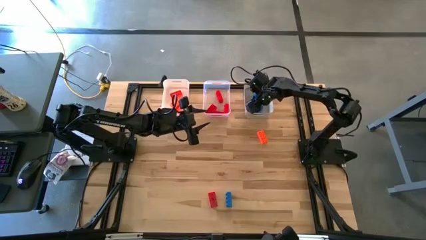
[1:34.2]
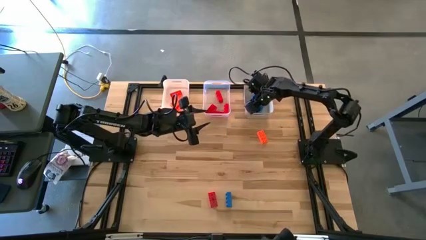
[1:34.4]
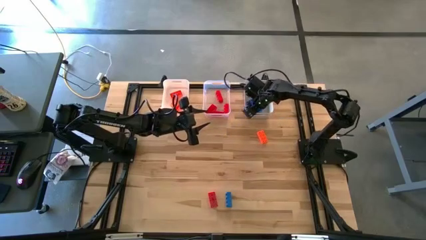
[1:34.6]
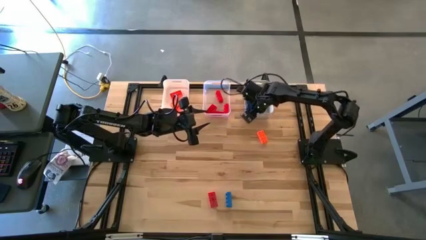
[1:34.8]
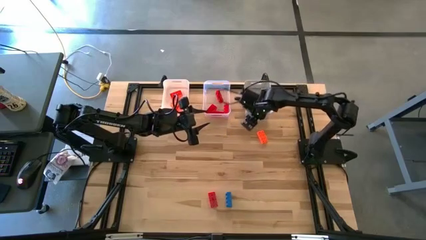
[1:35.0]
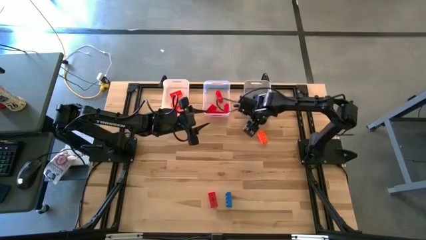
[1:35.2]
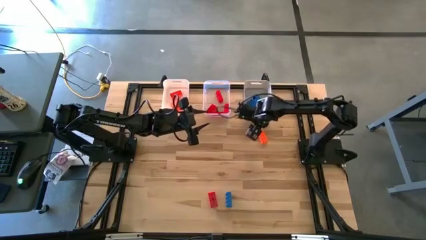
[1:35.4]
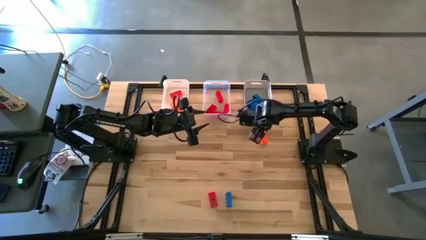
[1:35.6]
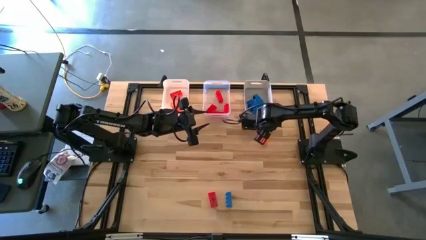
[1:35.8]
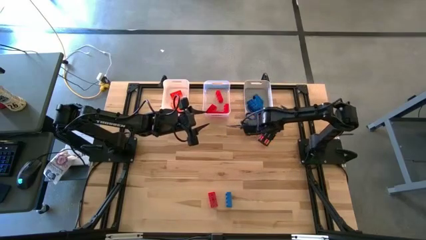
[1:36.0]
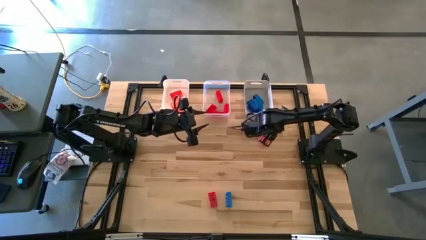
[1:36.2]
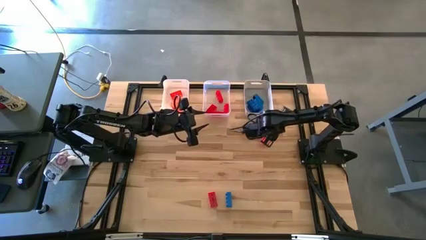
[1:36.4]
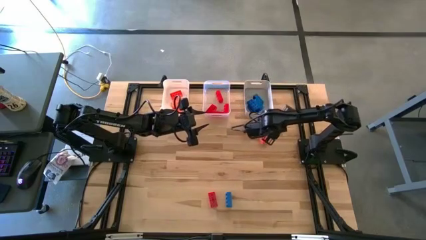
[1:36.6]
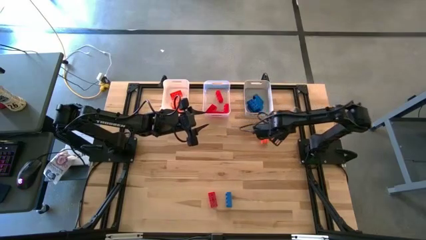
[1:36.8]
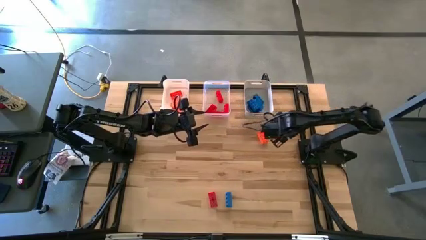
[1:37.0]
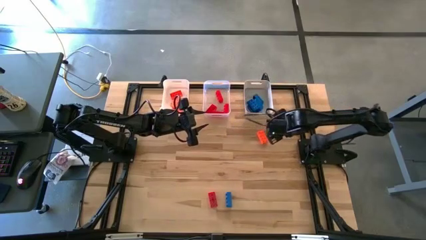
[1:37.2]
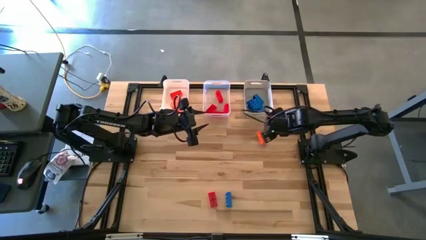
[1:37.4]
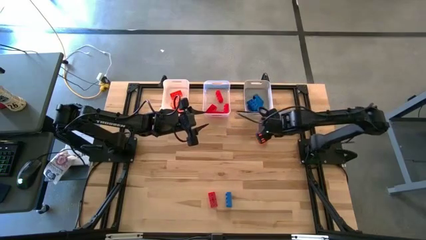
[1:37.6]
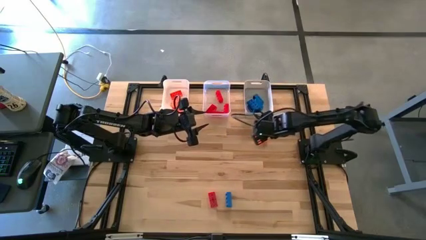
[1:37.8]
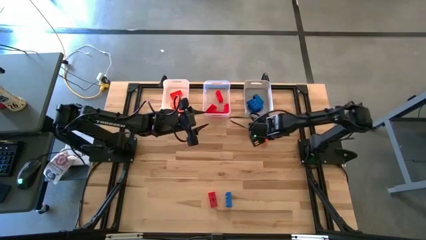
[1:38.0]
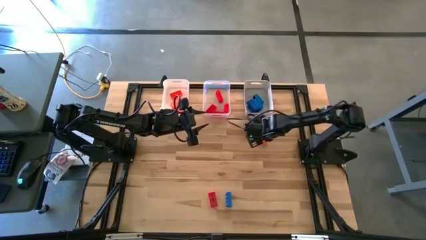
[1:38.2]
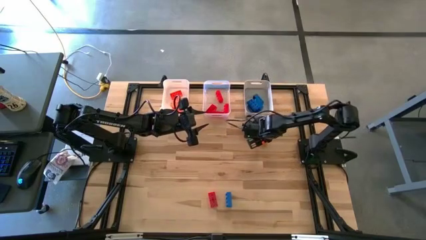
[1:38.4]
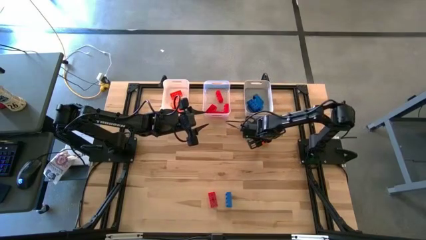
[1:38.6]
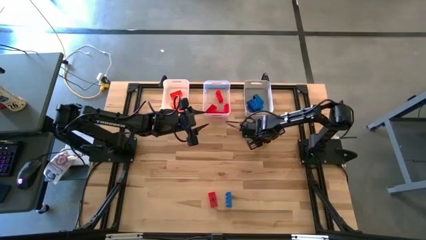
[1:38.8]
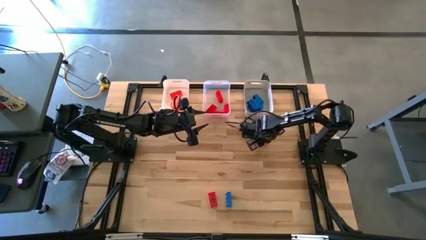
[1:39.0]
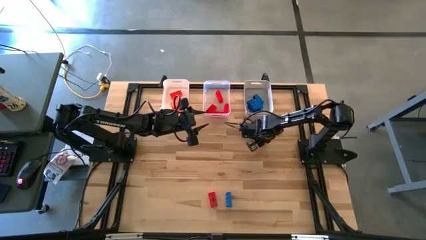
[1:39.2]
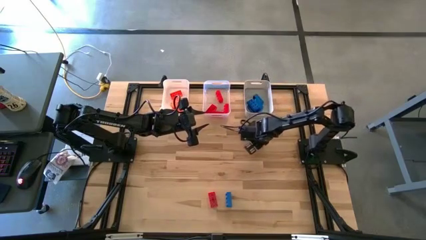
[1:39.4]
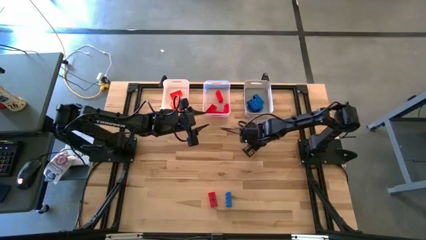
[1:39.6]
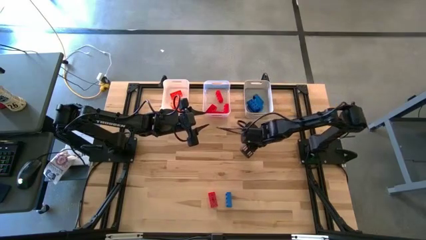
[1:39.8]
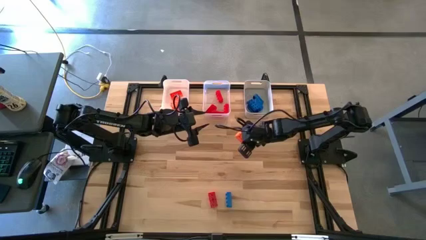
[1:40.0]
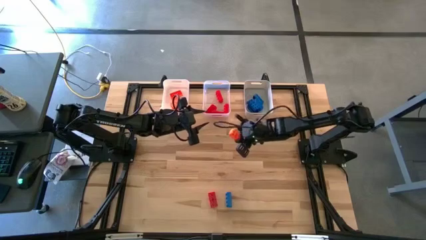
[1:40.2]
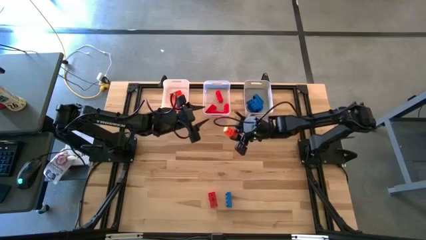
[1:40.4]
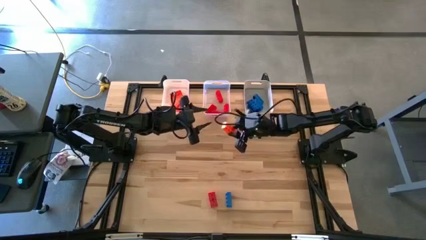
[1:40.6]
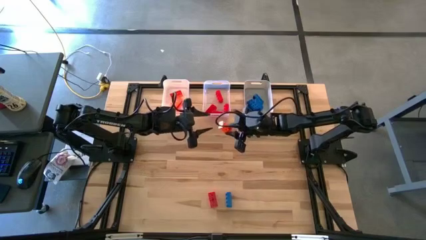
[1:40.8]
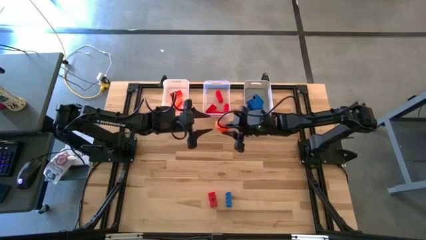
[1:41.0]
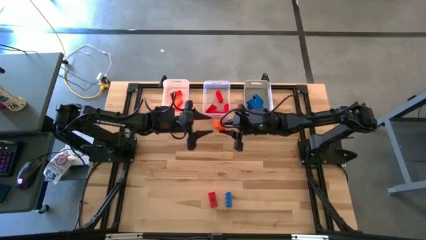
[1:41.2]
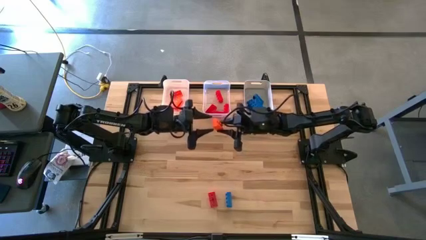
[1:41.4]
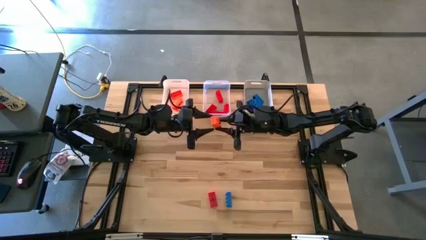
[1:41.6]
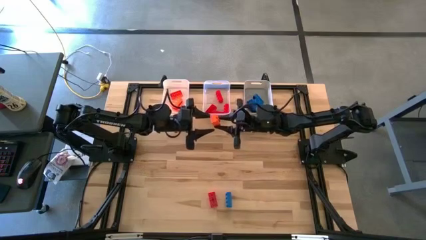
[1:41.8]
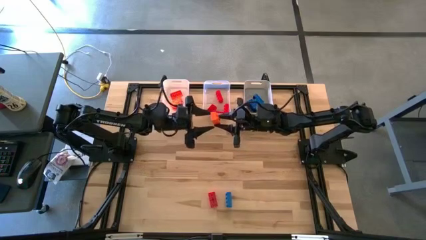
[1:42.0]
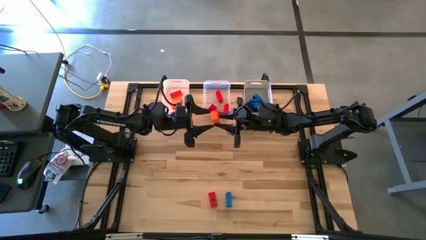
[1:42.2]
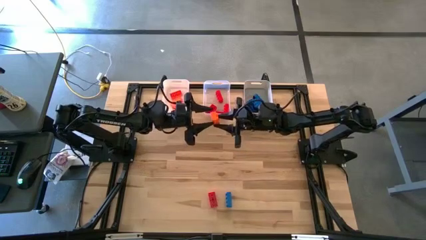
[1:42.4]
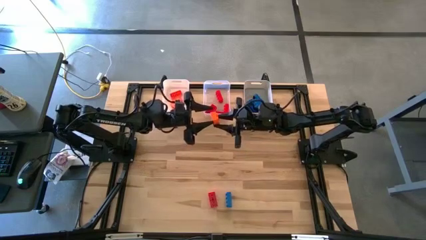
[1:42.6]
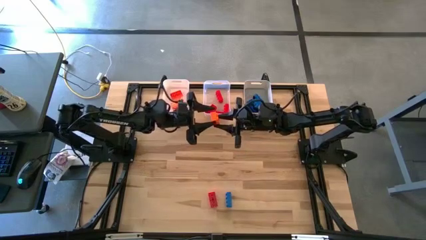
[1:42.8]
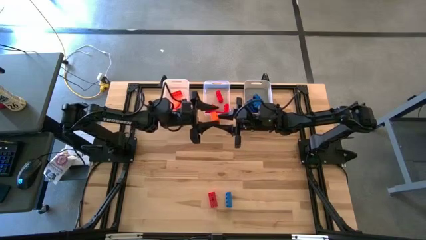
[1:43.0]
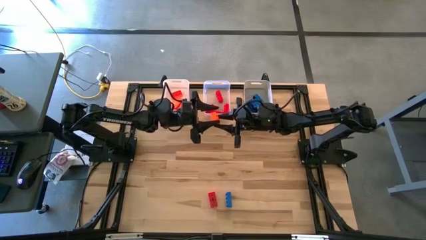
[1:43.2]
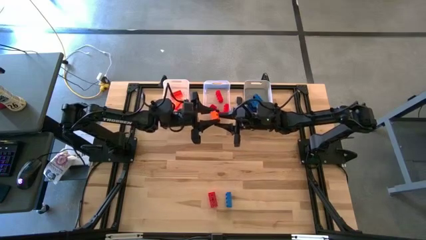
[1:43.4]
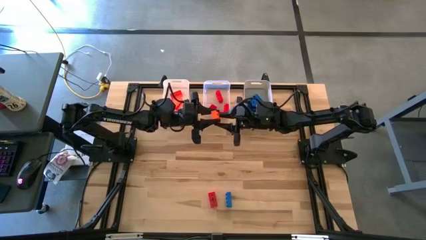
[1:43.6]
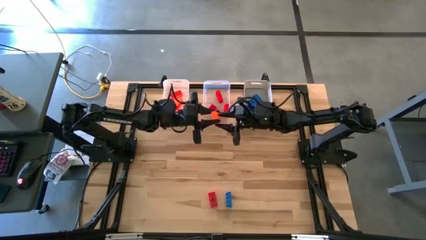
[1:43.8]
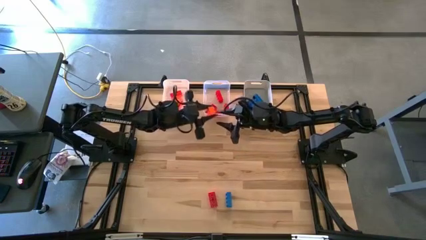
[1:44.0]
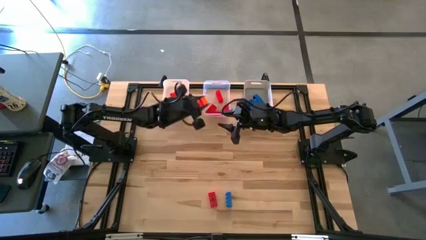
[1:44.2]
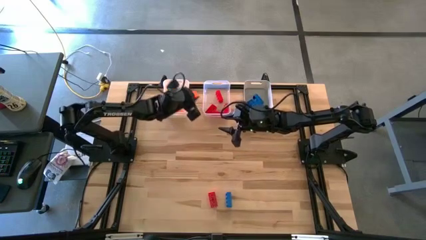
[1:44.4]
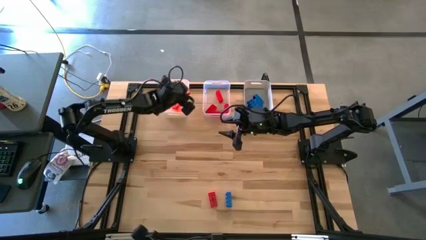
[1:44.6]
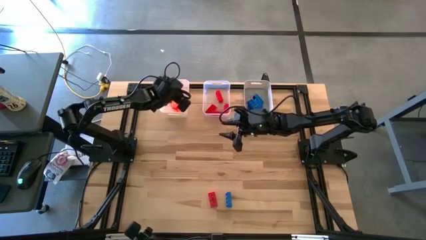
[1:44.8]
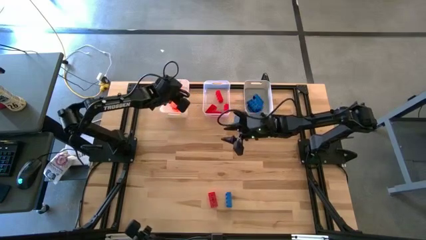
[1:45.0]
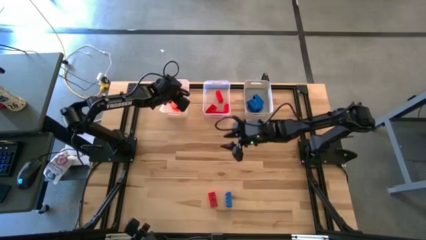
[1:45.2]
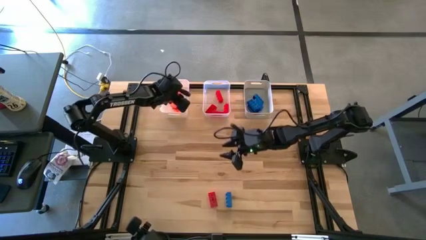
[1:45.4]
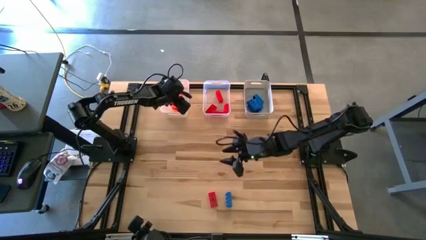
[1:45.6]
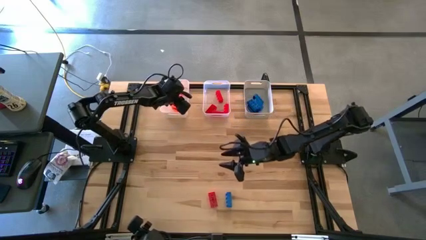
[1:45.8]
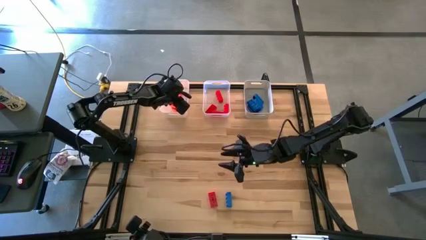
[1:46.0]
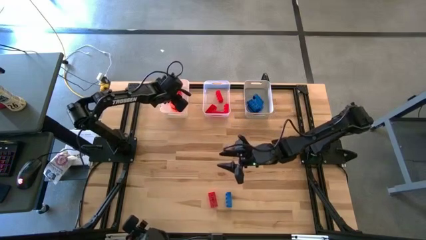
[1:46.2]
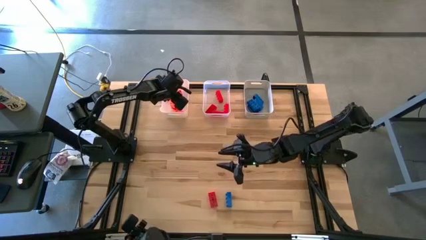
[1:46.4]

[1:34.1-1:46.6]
Task: Sort & place blocks by color
Put the orange game piece into the white bin

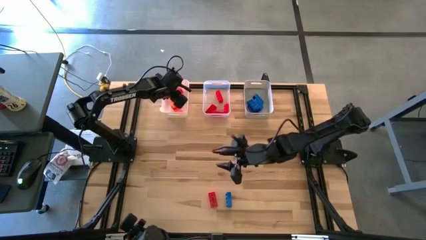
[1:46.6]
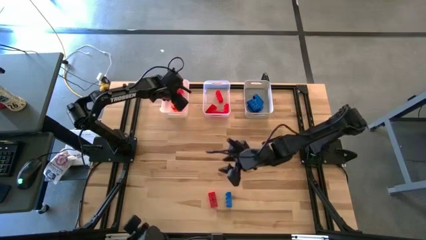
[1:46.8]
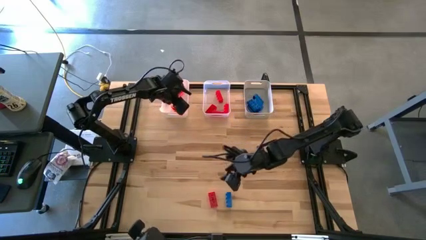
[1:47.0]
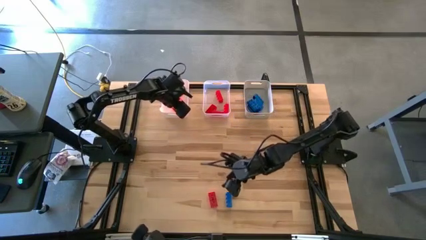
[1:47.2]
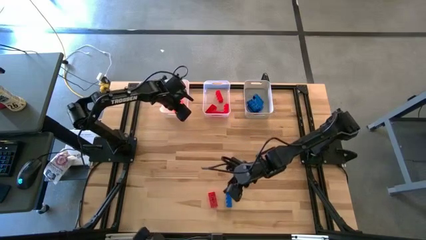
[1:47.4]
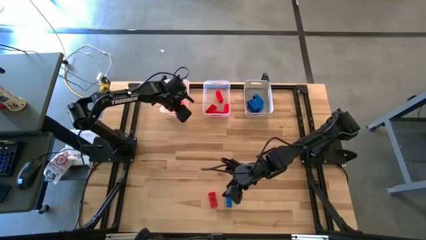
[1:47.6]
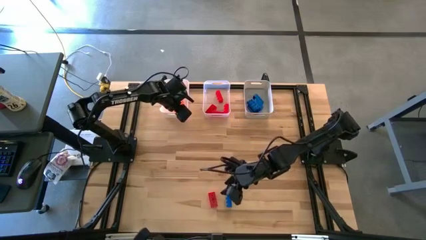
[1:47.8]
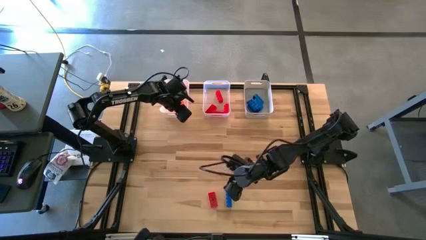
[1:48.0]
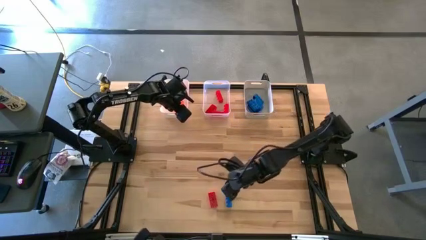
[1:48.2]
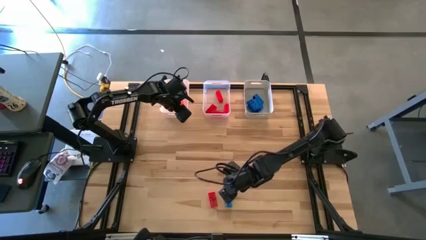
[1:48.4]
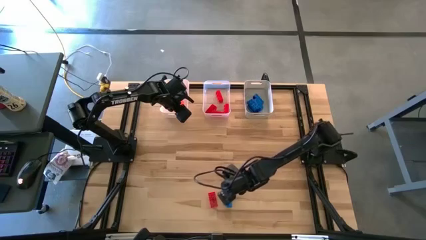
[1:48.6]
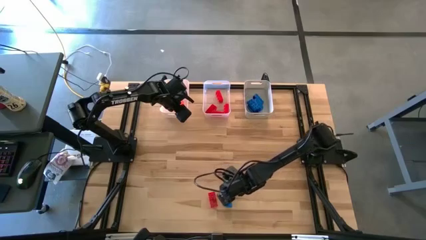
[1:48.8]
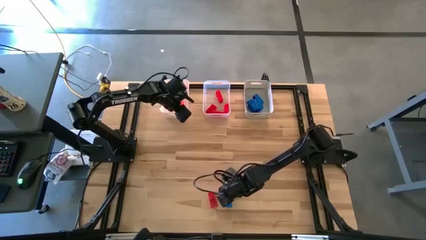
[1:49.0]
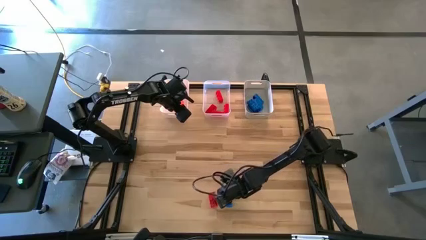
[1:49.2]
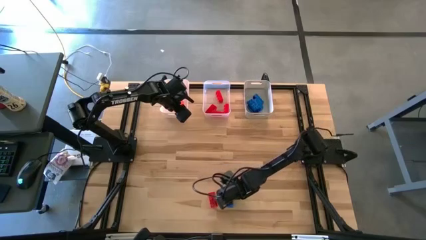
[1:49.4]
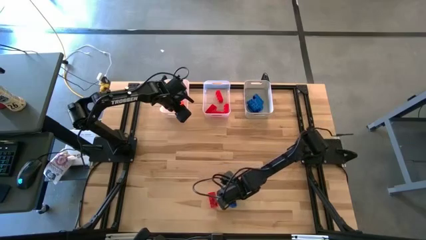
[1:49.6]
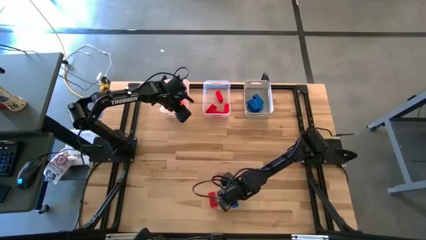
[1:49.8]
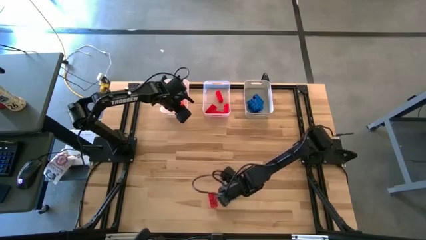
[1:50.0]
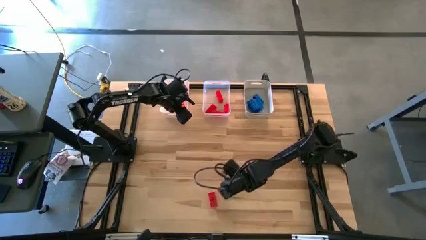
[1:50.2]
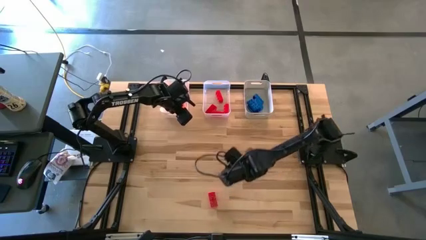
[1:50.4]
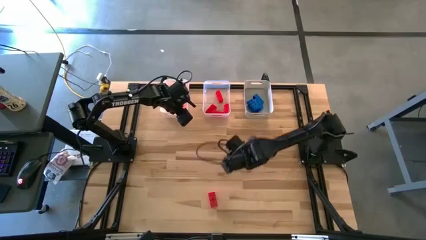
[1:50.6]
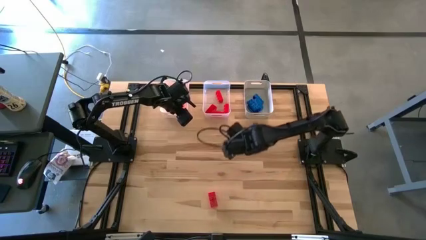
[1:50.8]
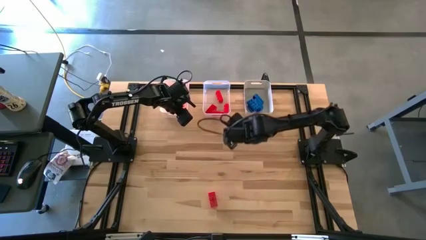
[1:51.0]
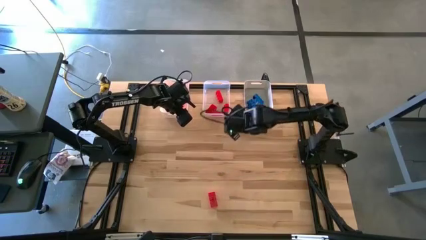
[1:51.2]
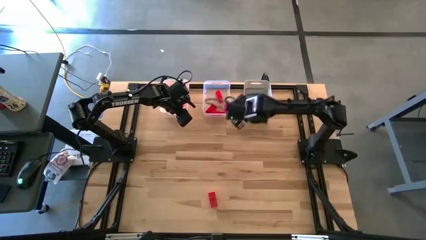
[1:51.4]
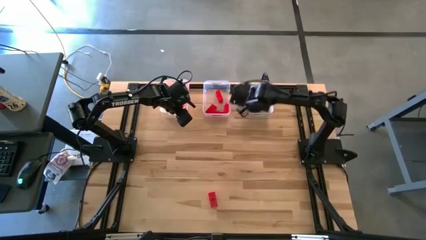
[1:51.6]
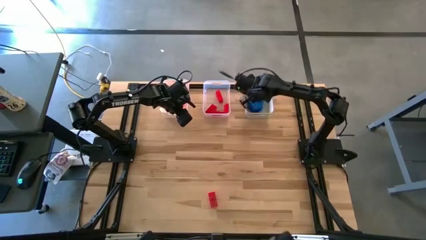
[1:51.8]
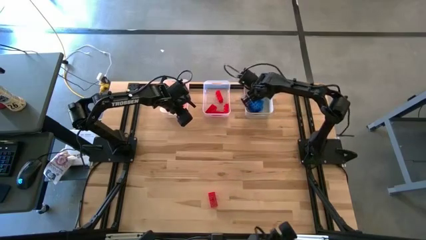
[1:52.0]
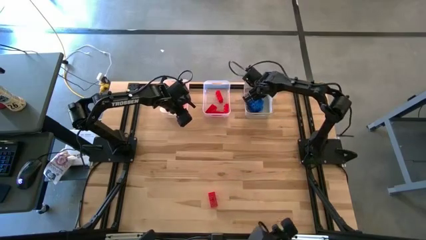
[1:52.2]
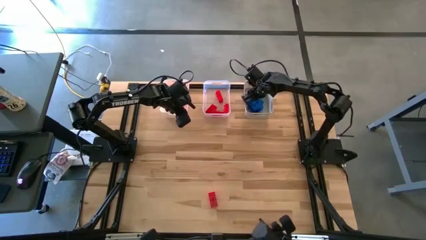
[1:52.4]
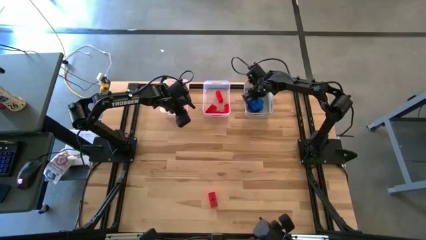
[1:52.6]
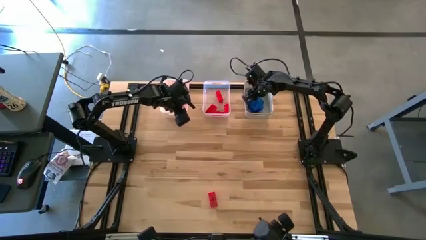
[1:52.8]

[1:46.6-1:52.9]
Put the blue game piece into the gray bin
